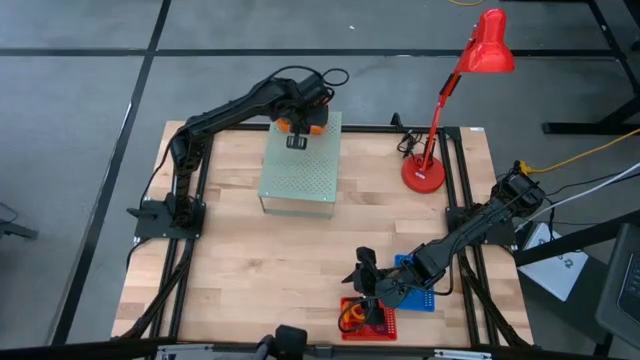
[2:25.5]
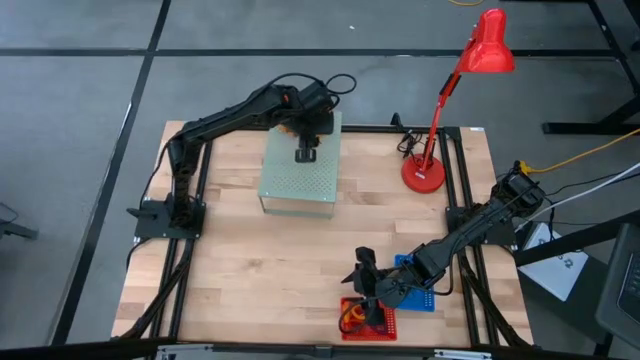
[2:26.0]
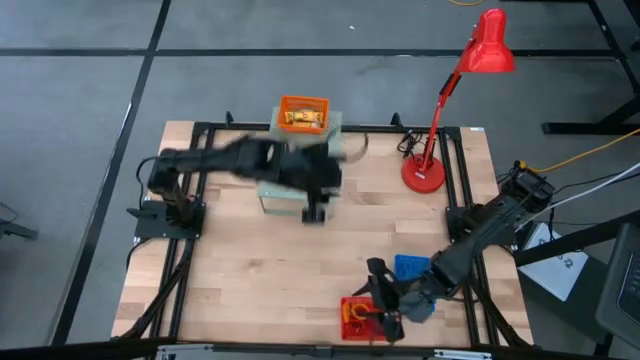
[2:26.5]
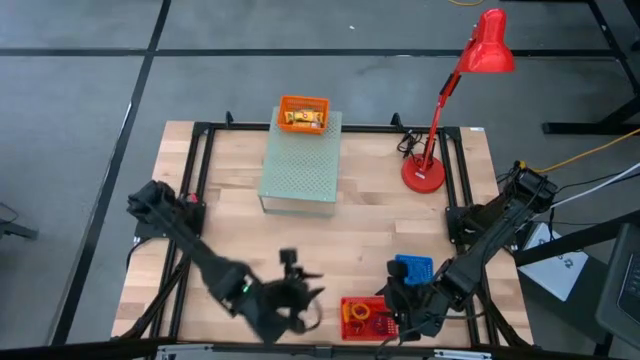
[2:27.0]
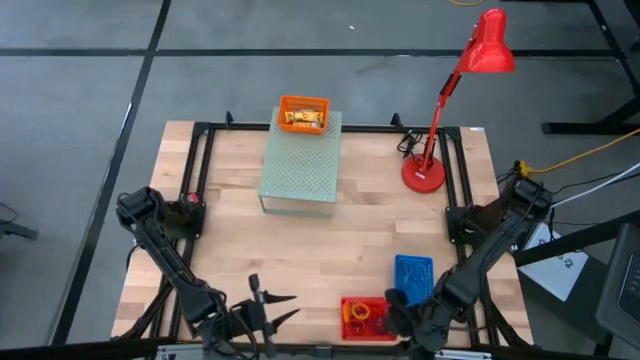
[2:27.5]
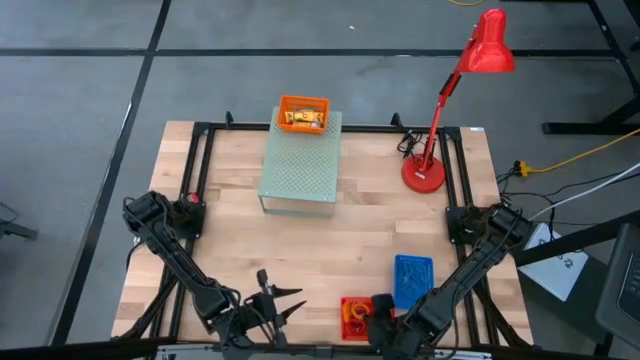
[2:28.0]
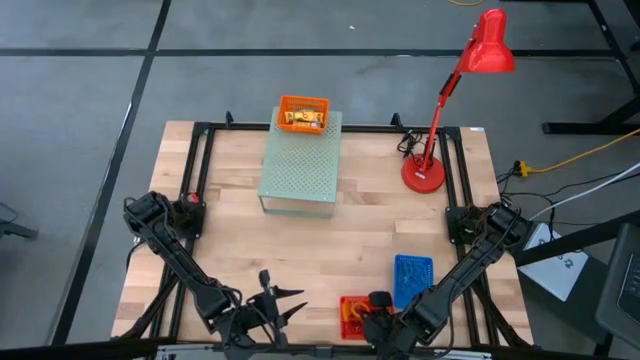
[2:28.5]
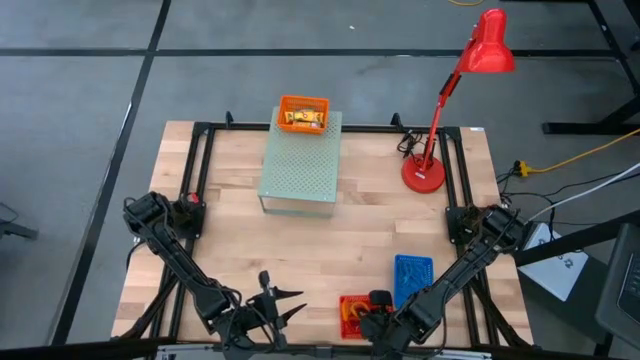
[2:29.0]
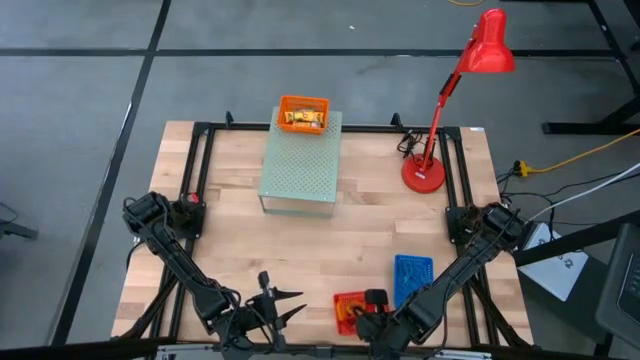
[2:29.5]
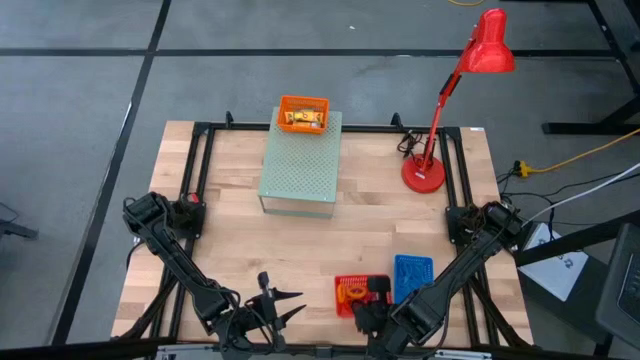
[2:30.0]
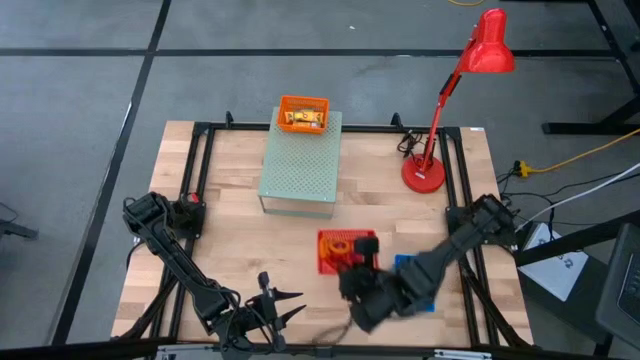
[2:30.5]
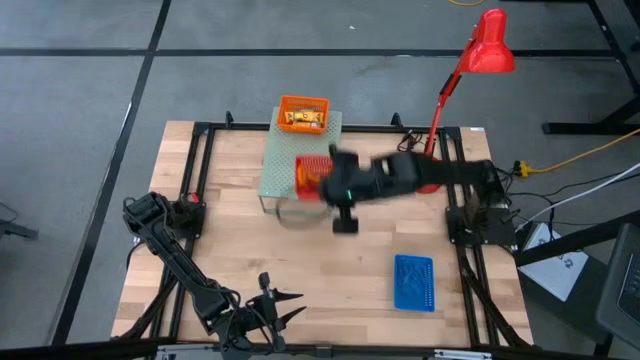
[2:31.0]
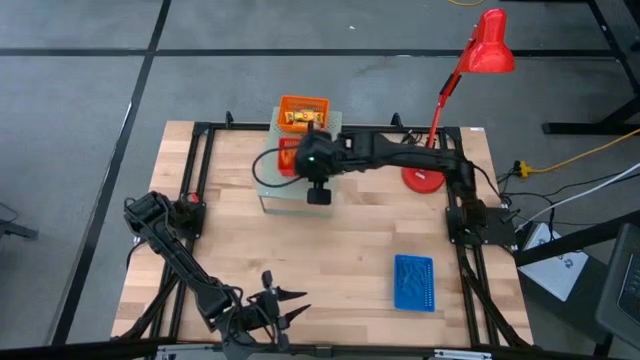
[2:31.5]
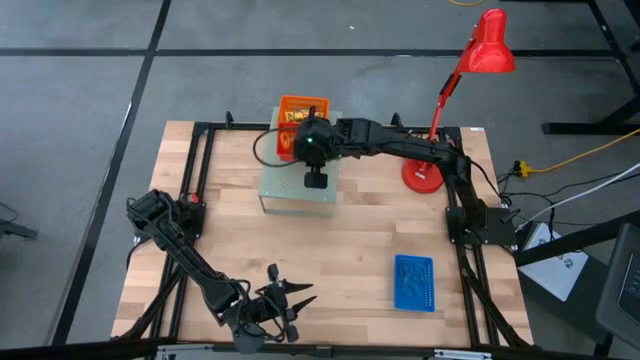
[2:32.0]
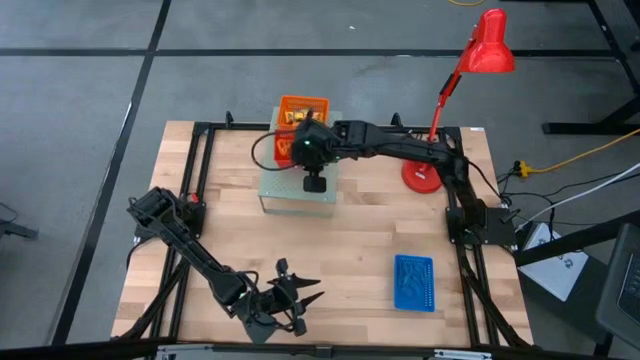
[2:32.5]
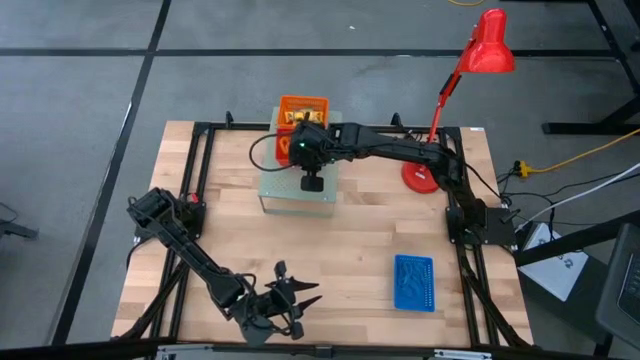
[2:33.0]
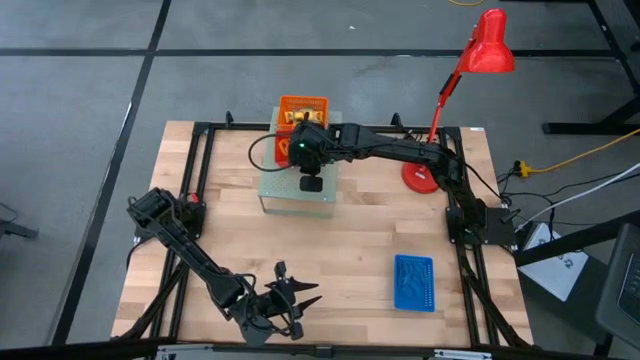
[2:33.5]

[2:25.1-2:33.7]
Task: Pick & Place Office Desk Supplies
Put the red bin on the shelf

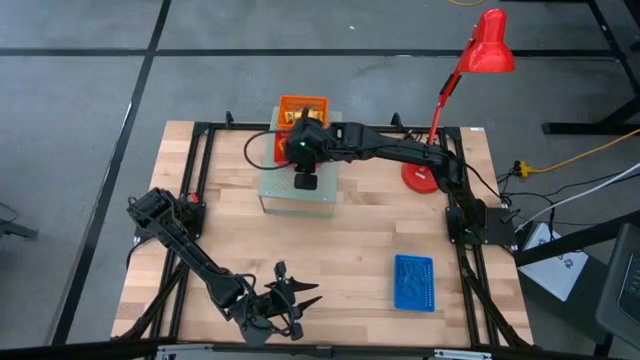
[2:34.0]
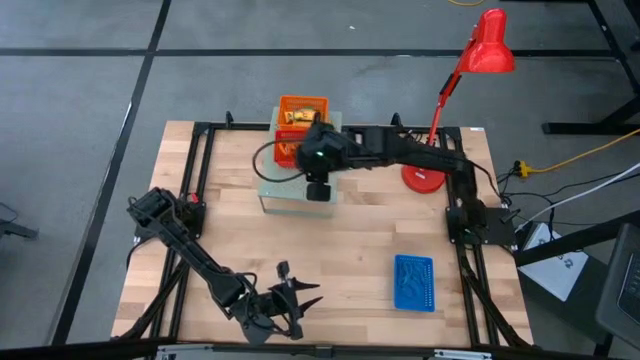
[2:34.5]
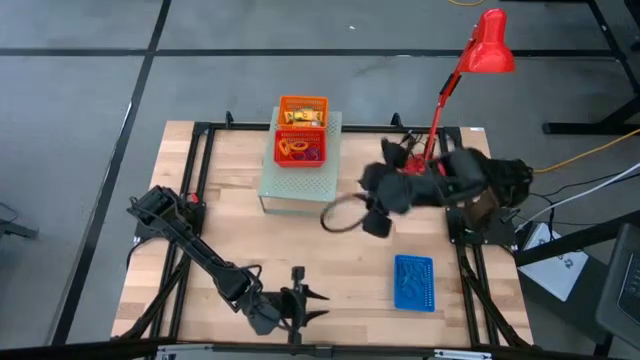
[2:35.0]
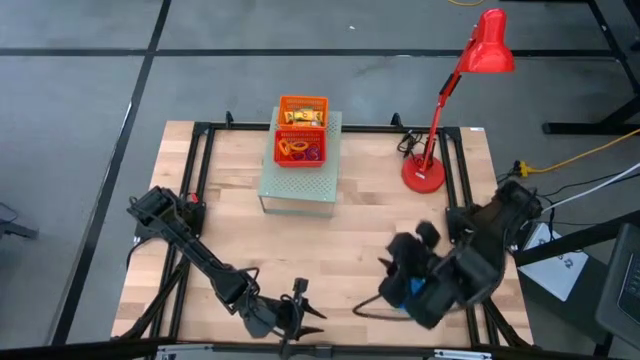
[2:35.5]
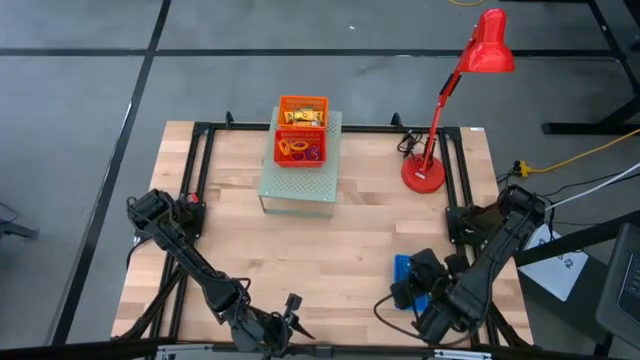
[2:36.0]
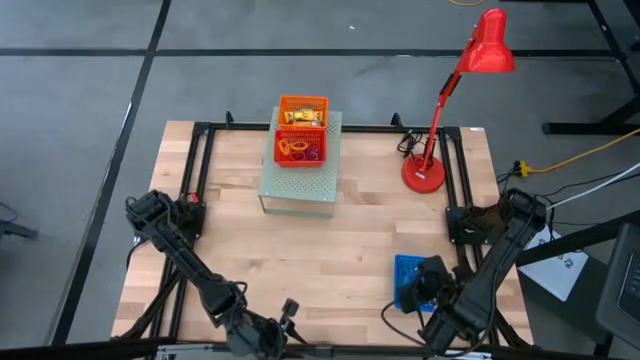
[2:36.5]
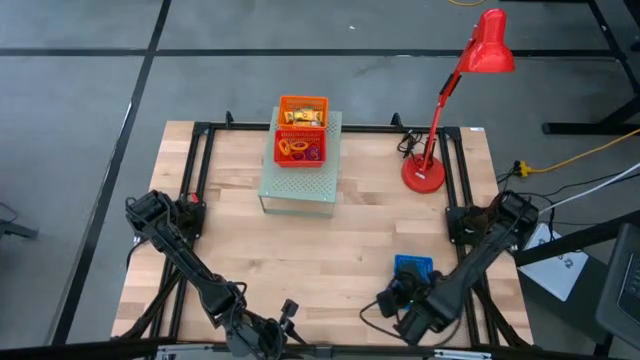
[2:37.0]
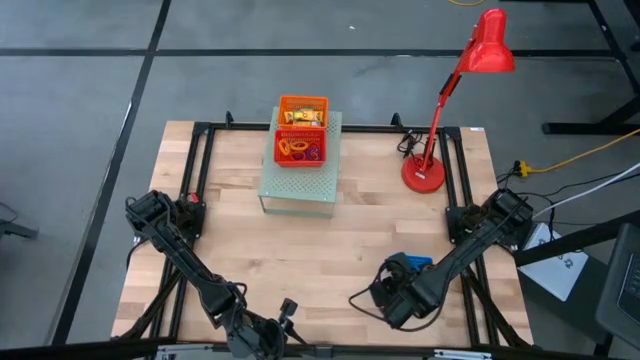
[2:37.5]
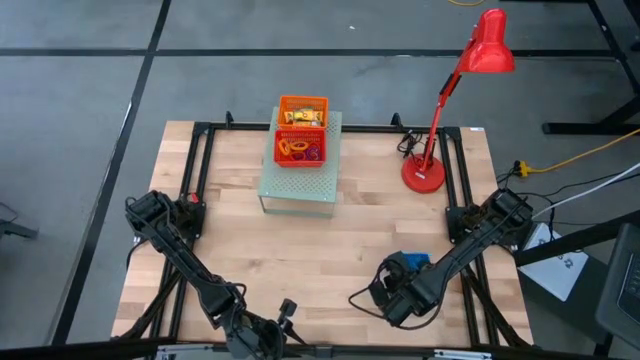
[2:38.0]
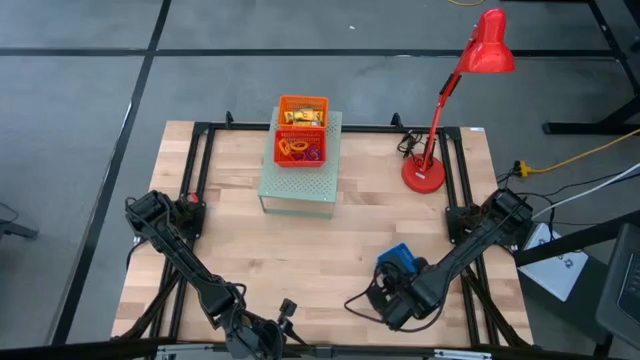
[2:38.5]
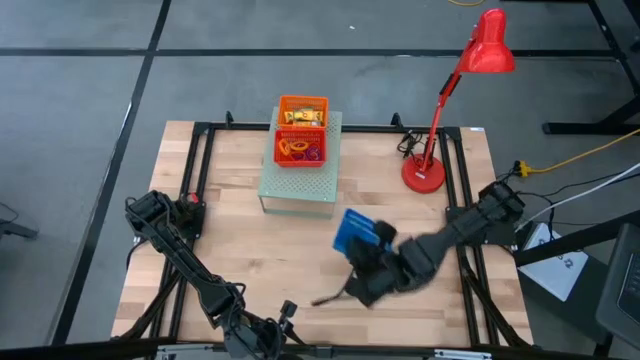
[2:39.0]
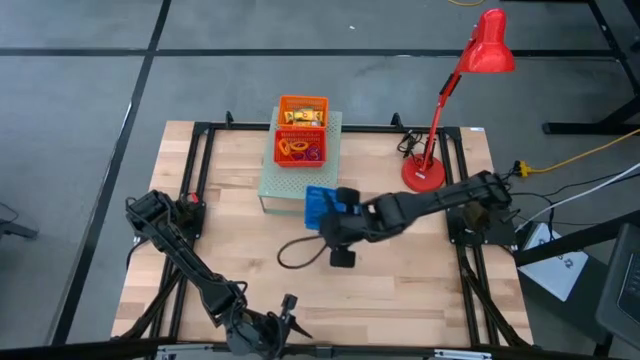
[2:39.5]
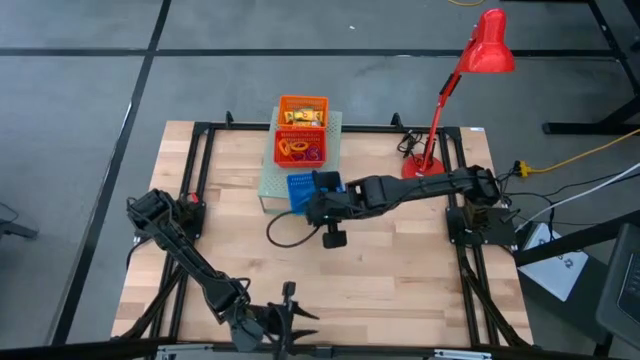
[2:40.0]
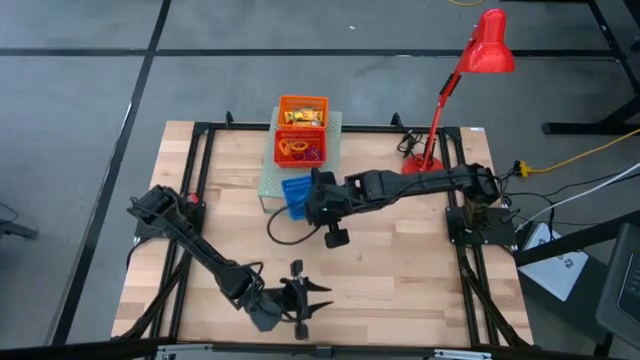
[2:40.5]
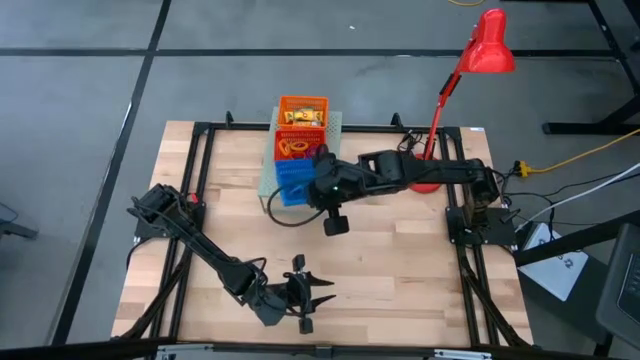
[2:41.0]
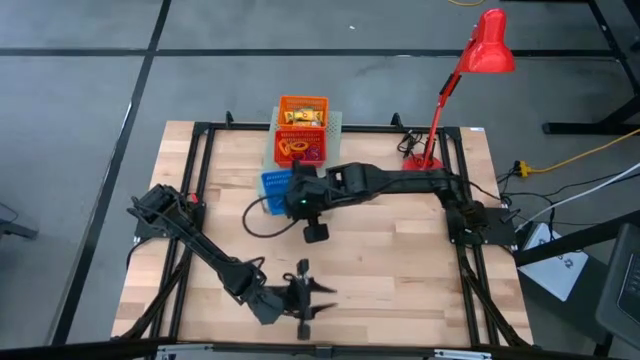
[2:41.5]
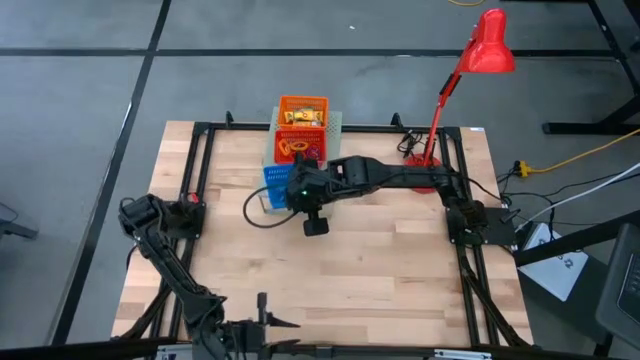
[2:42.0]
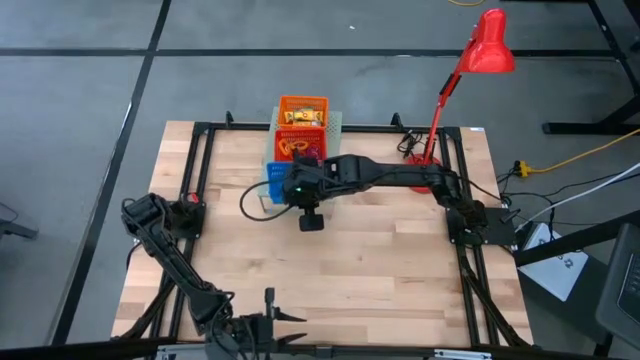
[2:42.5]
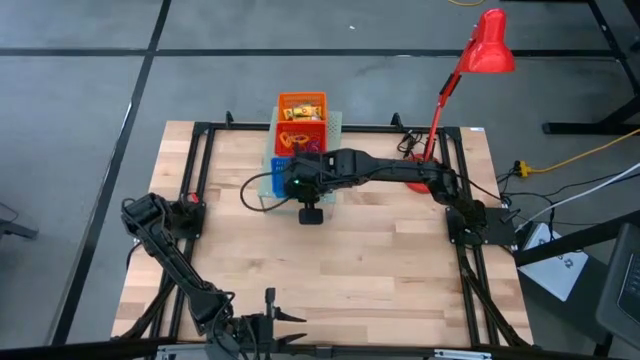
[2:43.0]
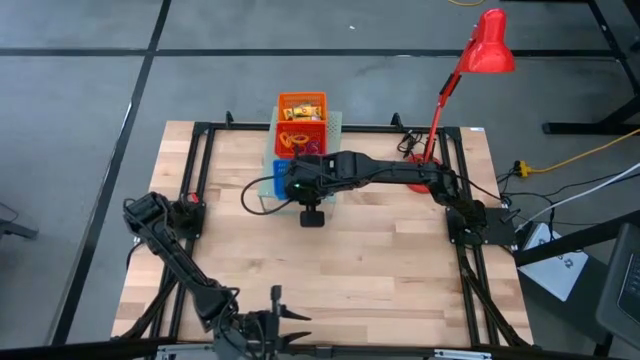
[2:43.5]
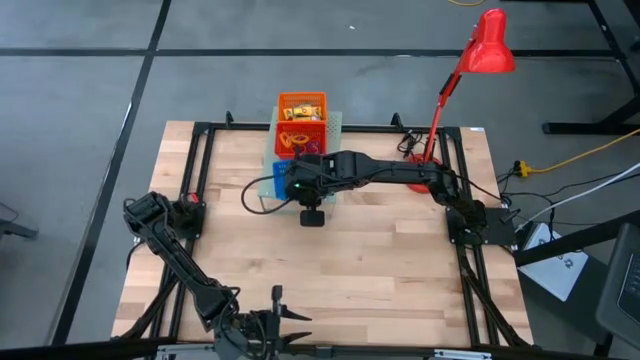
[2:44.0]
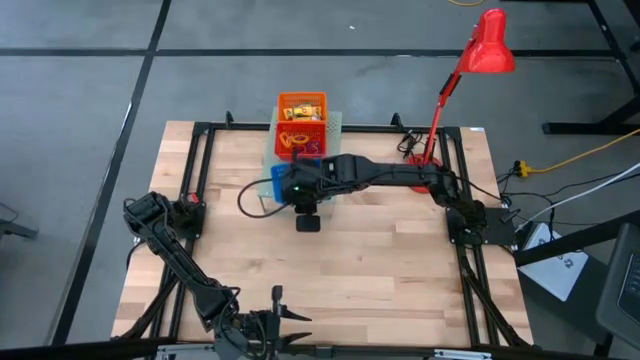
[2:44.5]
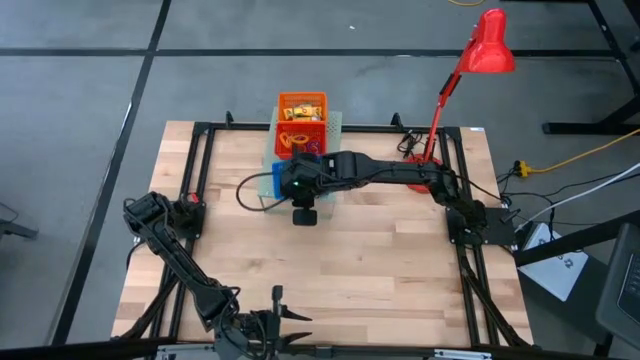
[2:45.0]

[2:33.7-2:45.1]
Put the blue bin on the shelf

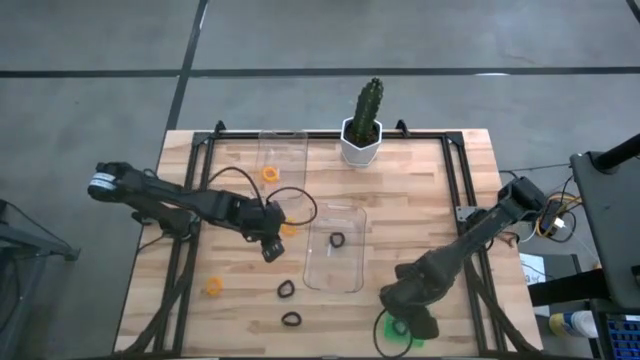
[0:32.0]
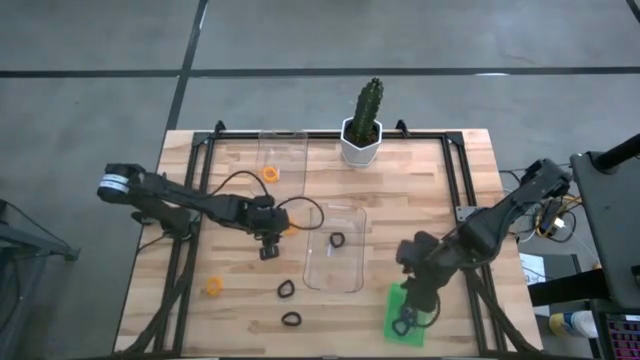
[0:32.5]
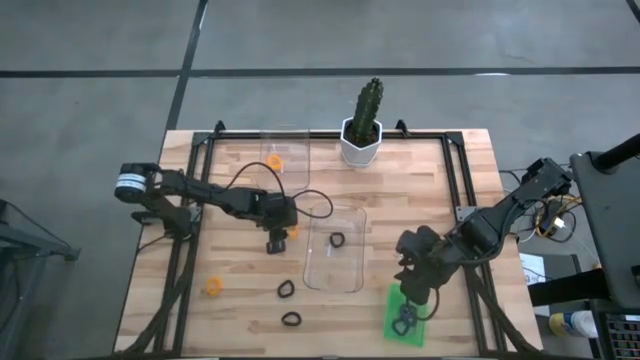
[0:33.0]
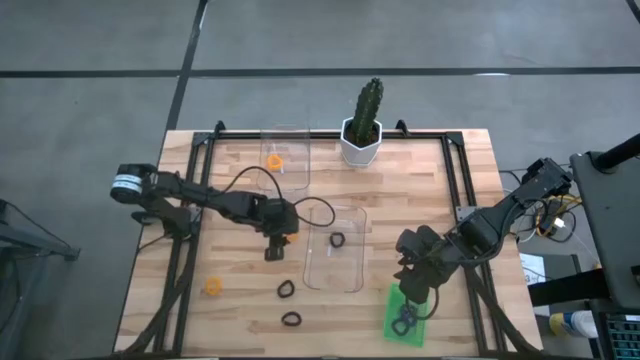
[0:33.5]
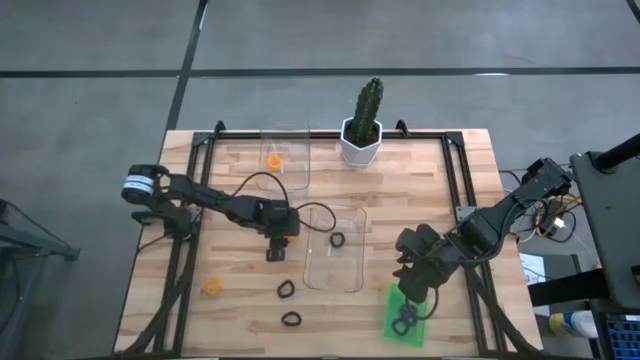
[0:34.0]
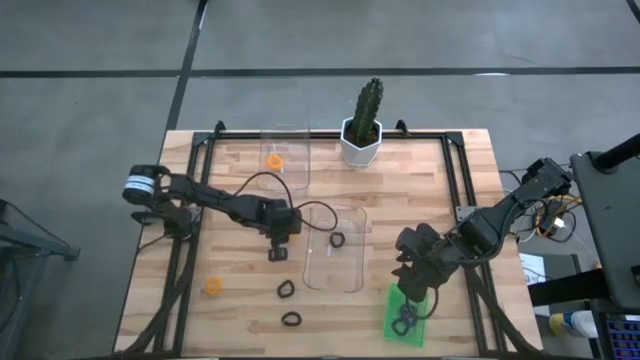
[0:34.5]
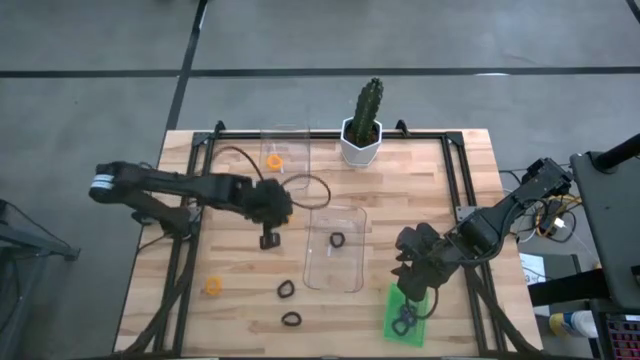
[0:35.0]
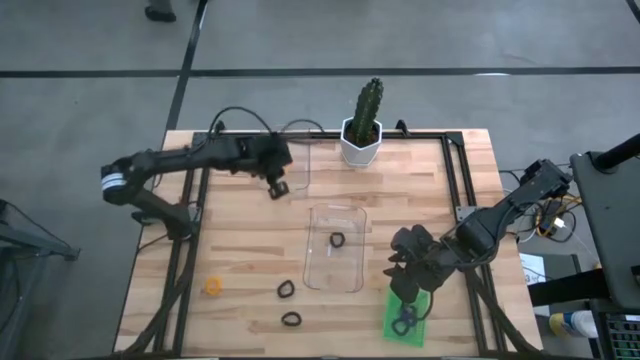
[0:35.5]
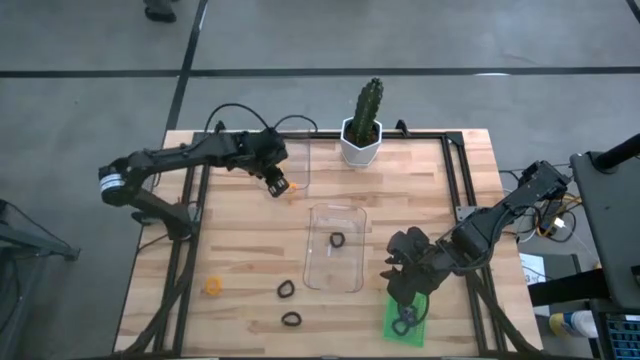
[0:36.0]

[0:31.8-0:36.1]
Task: Sort spring keychains
Put the top yellow spring keychain into the top transparent bin
